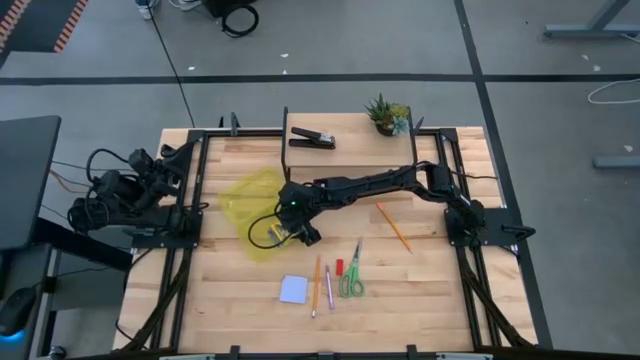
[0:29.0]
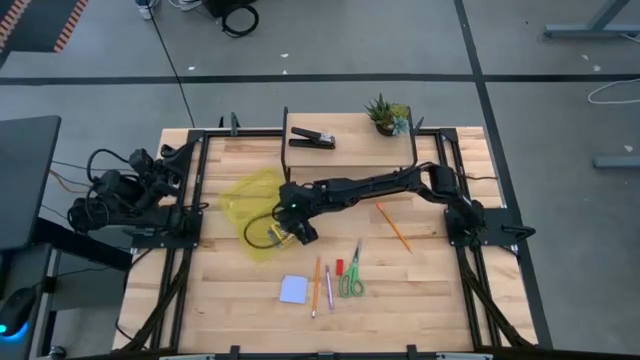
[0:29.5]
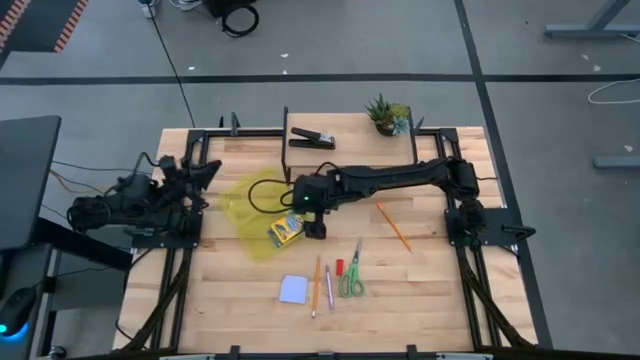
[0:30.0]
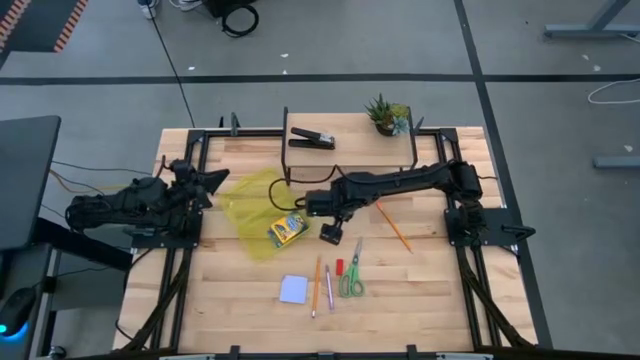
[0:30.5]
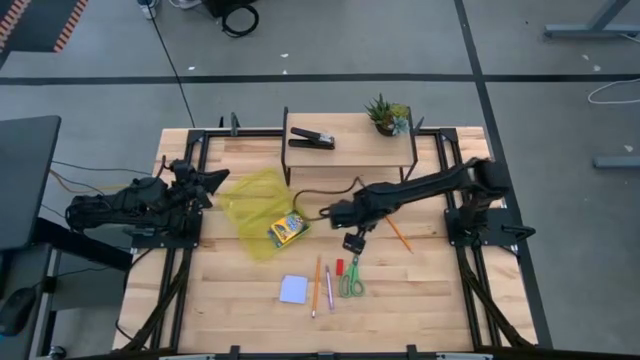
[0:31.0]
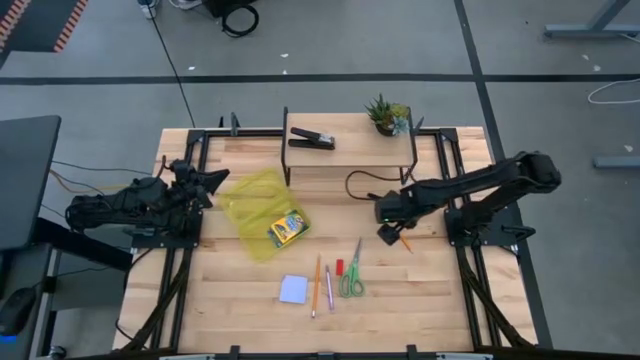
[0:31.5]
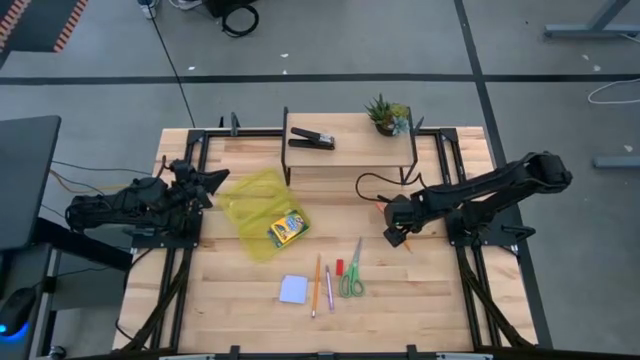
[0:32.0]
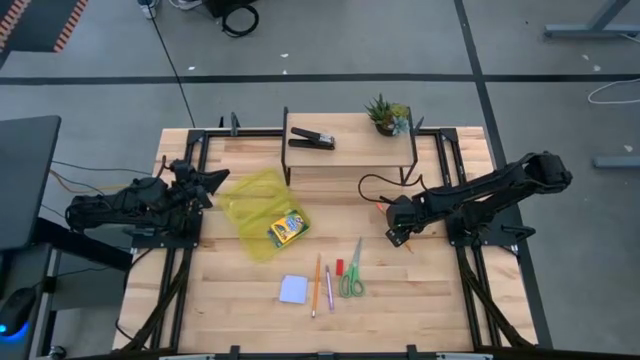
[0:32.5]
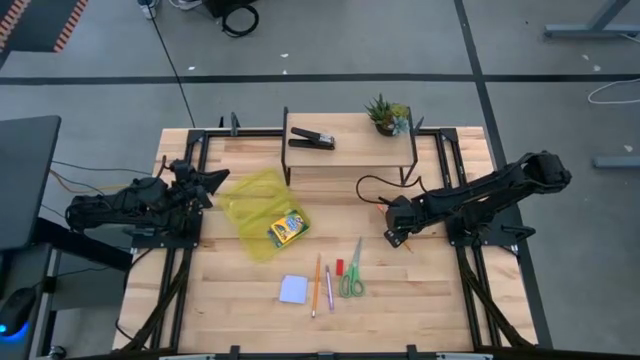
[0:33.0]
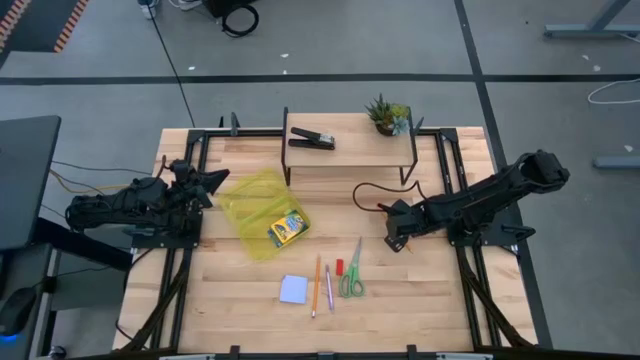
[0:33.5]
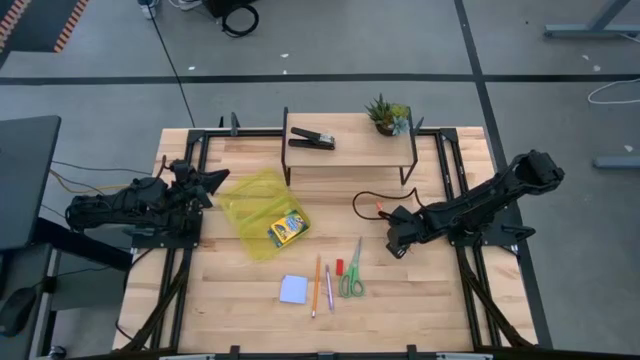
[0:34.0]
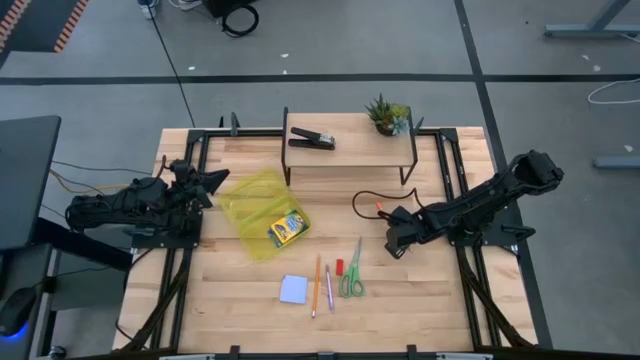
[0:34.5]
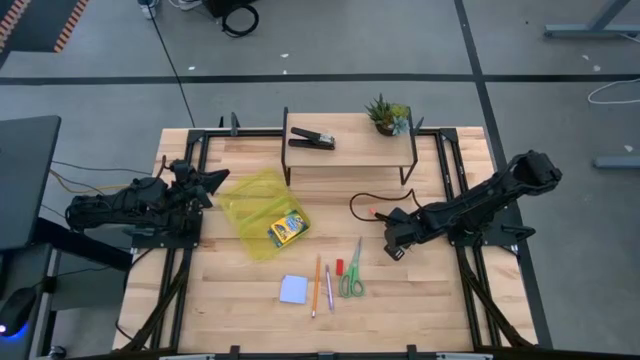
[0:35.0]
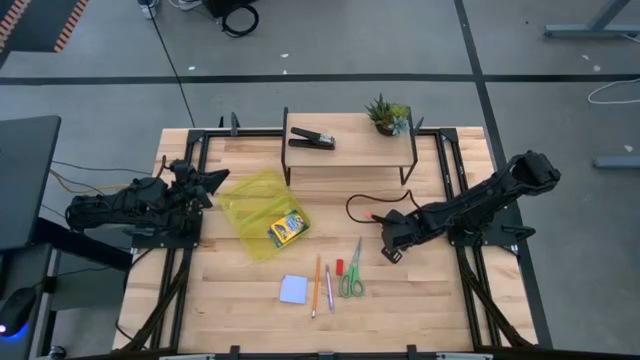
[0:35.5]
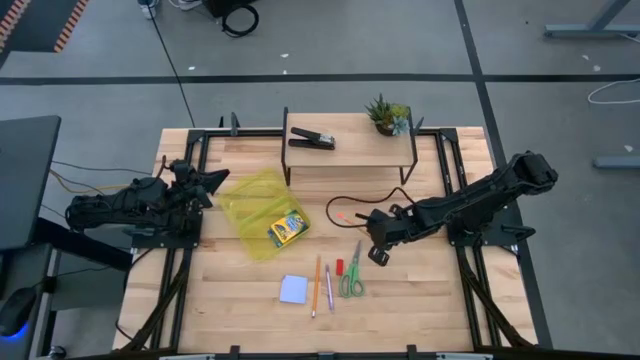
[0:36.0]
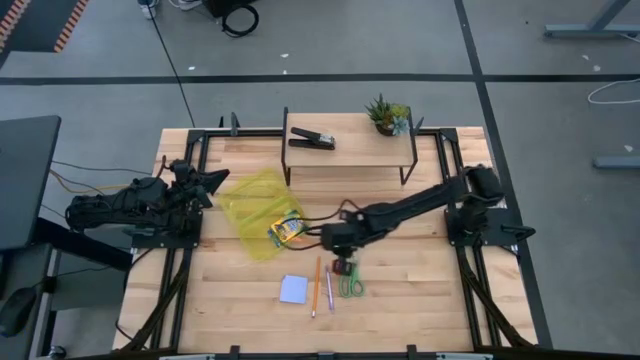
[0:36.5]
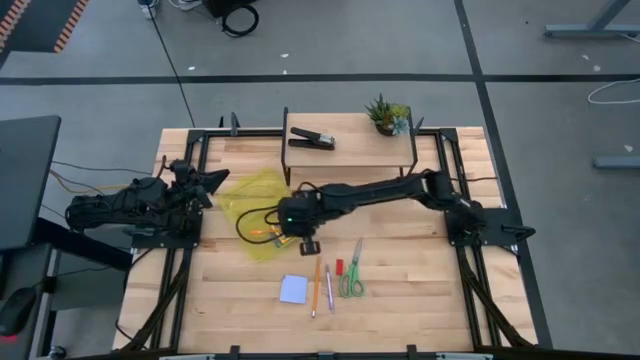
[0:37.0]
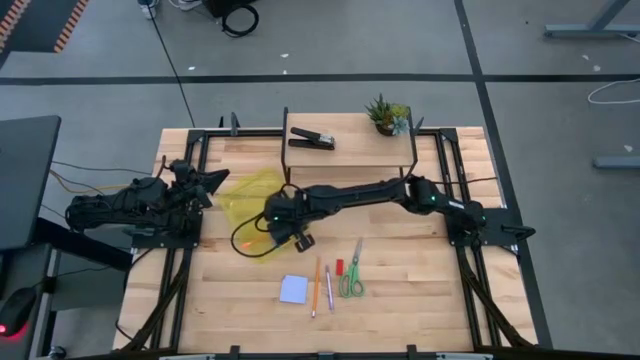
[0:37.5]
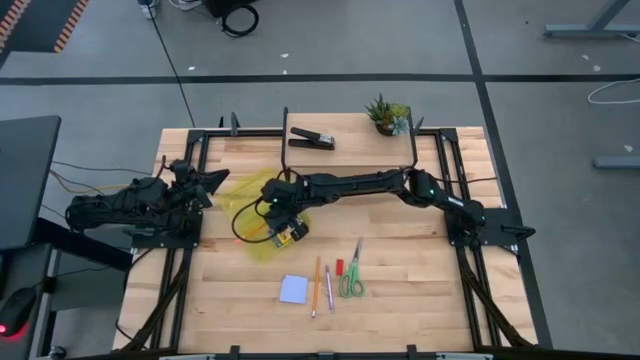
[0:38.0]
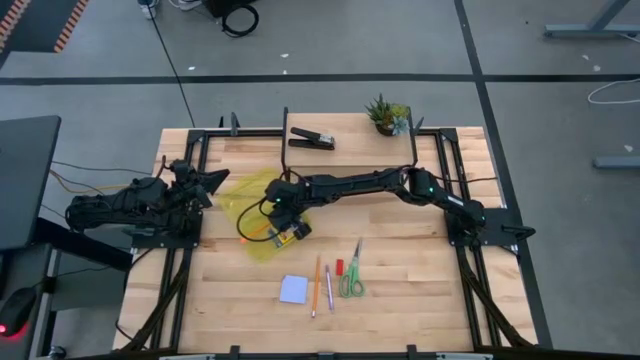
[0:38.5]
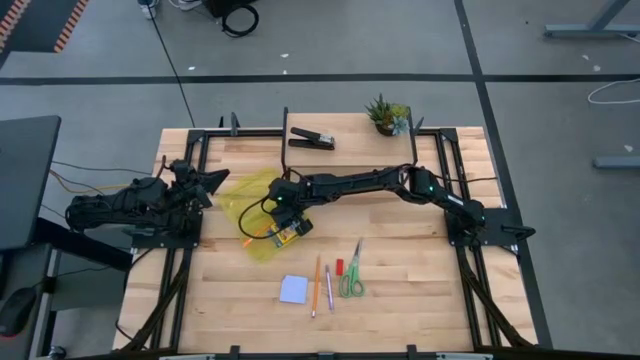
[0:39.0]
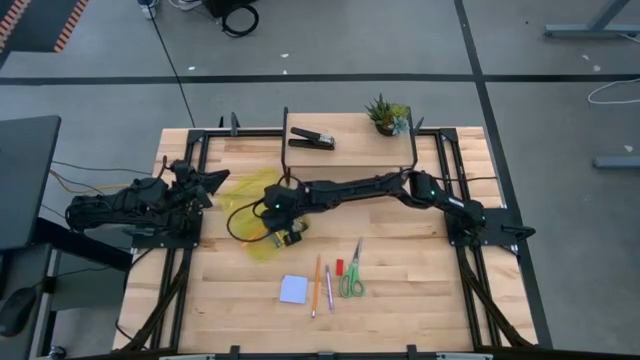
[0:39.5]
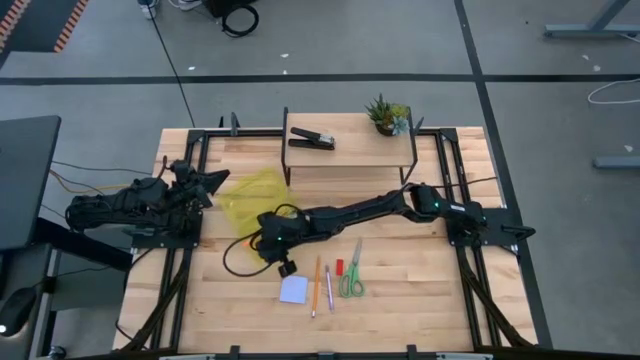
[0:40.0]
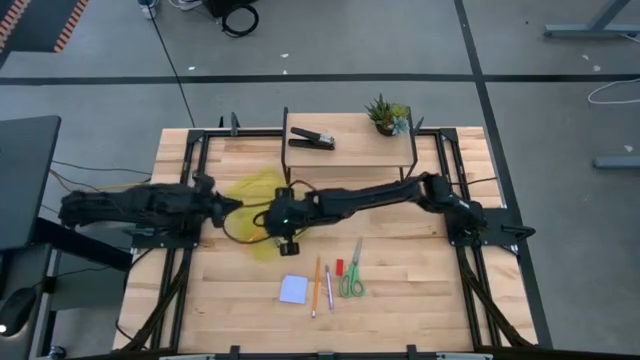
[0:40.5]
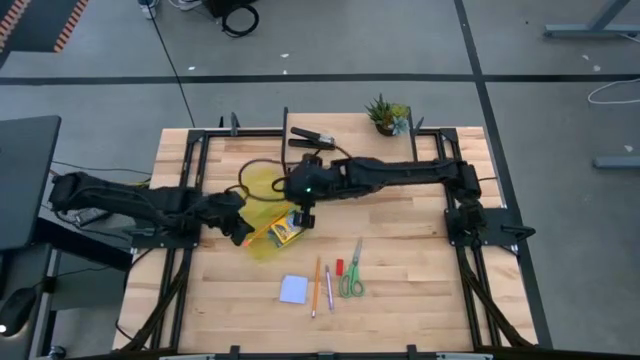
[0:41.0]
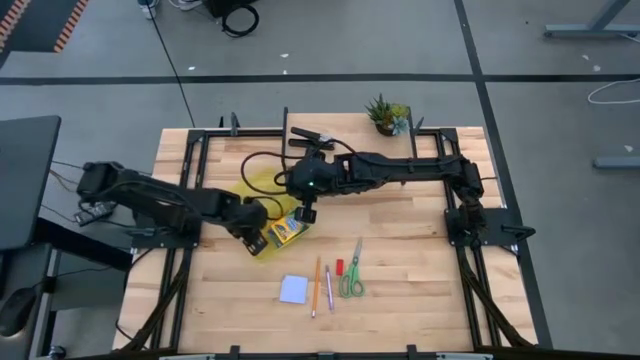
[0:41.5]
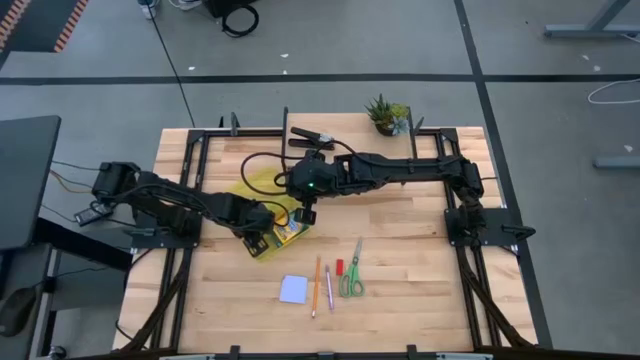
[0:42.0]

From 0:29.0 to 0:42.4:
Task: Pack school essentials
Put the top orange pencil into the yellow supply box

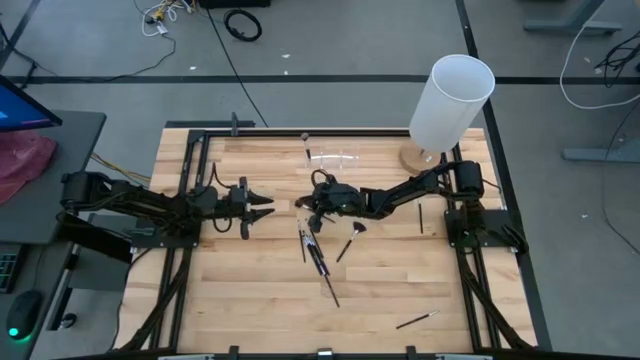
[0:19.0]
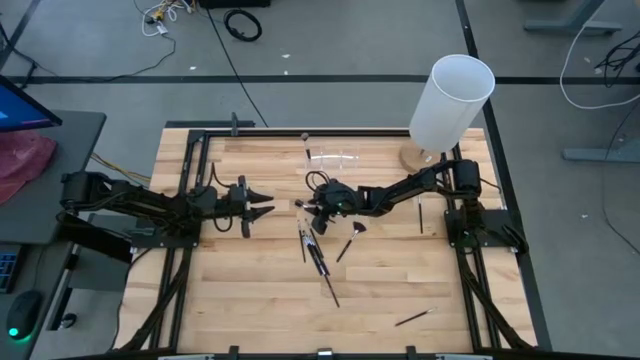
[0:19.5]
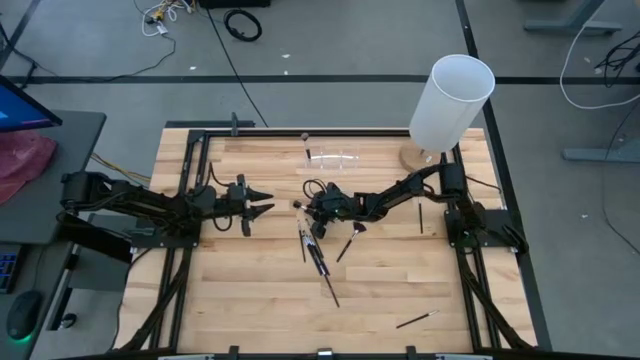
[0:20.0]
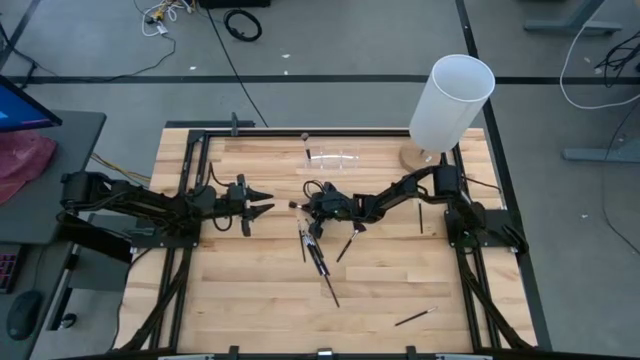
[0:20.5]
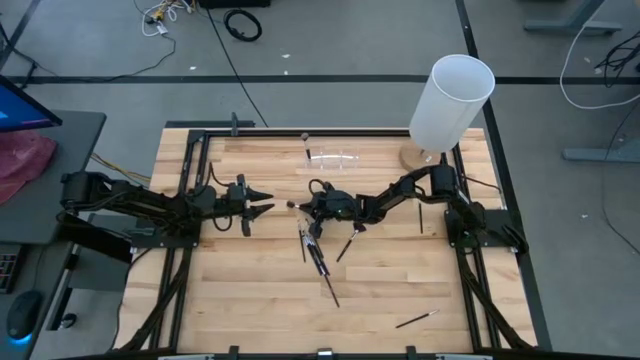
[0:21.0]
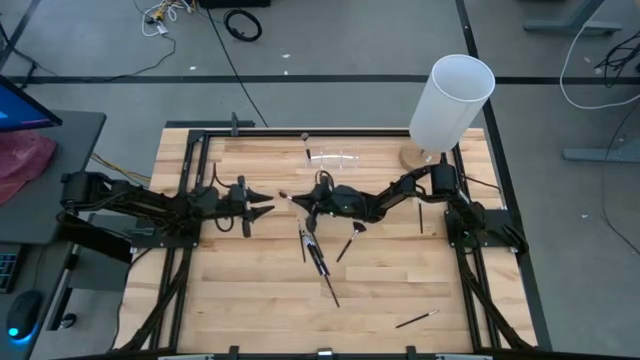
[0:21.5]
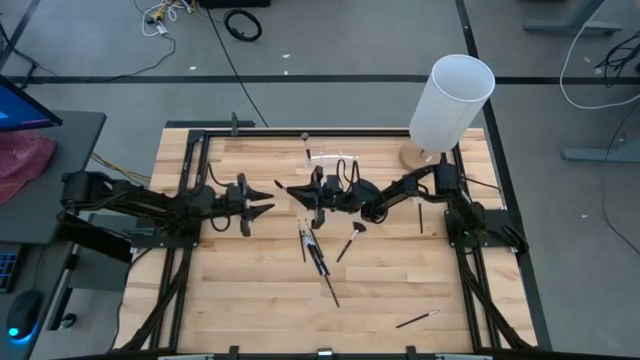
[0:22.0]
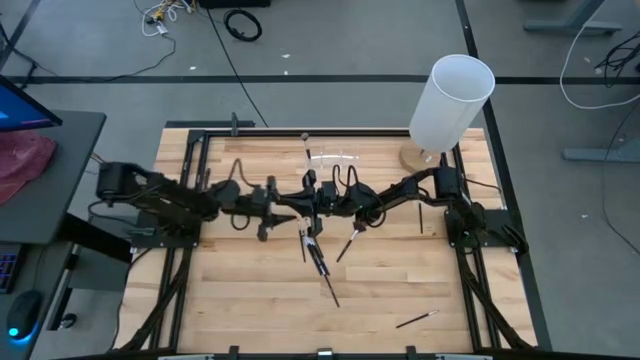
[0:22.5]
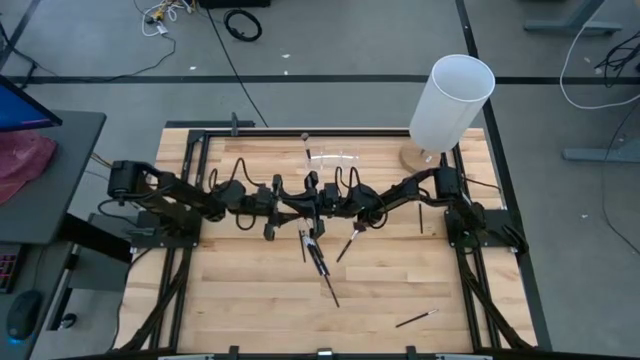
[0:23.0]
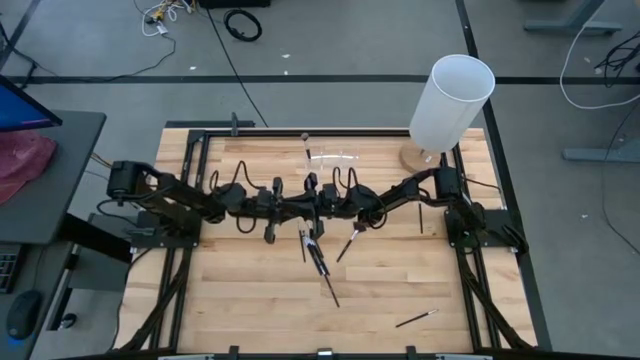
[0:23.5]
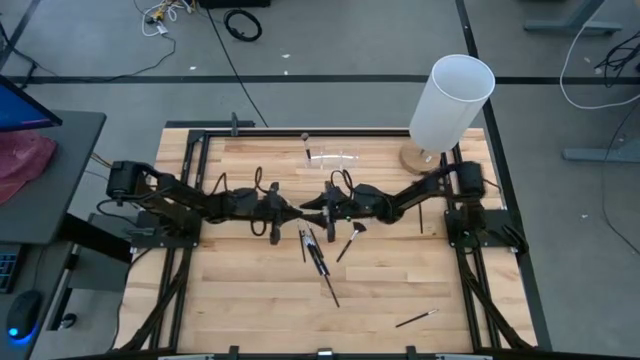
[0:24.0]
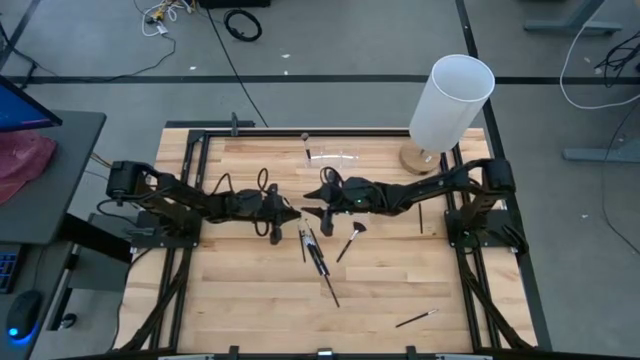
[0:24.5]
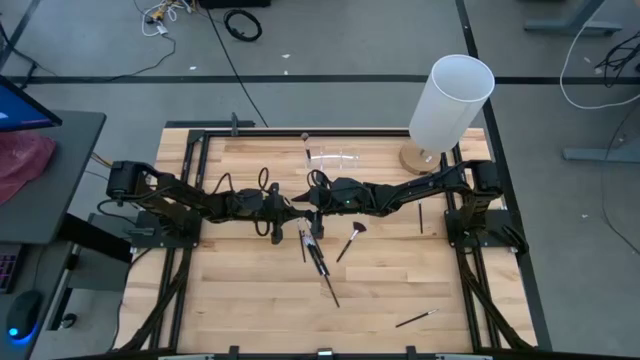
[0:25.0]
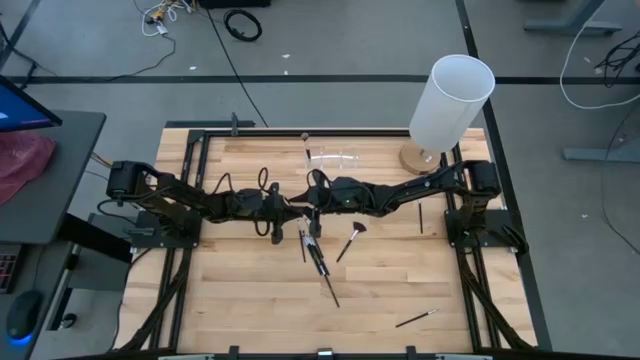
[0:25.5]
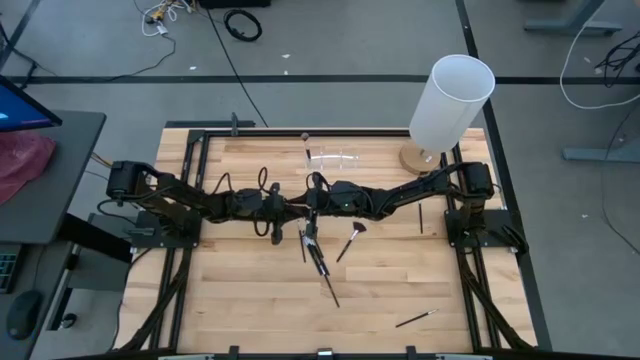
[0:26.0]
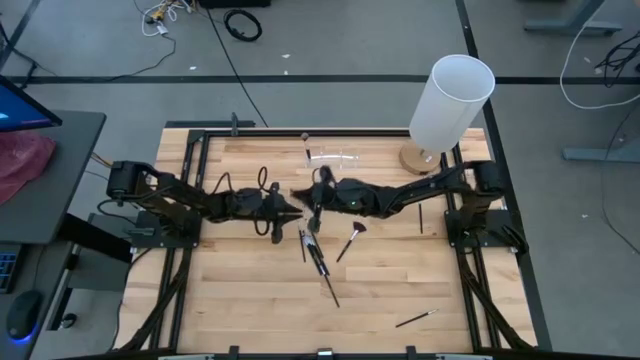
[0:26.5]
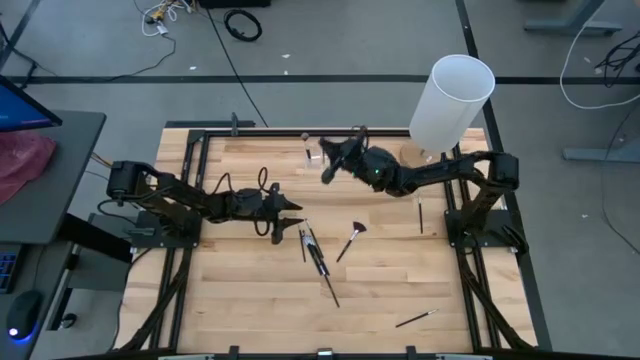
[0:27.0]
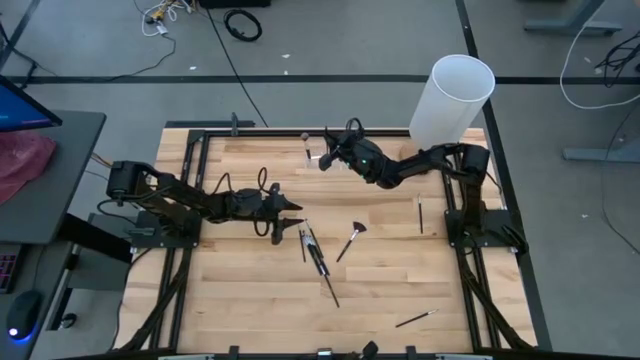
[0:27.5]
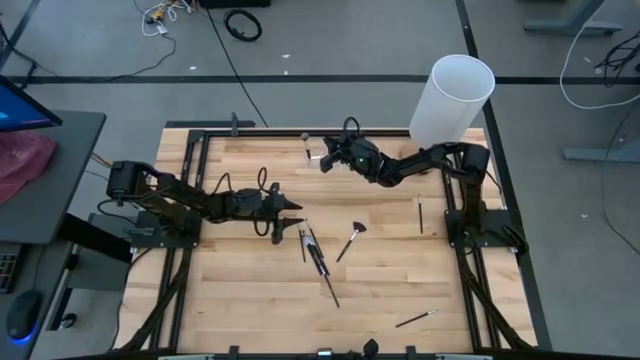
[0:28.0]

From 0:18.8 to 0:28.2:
Task: Pick & Place Makeup Supplies
Put the black makeup brush into the transparent organizer
